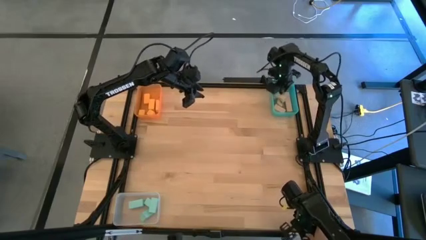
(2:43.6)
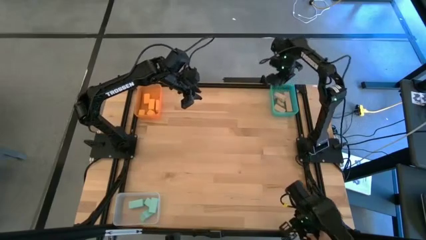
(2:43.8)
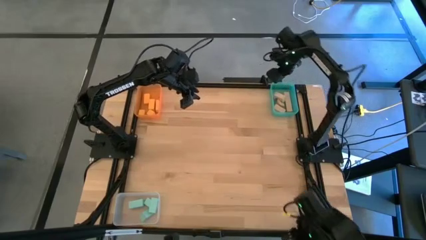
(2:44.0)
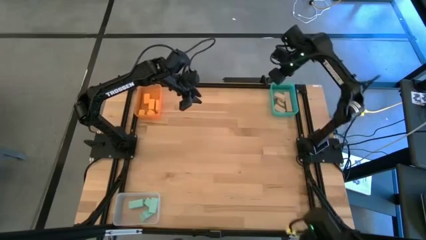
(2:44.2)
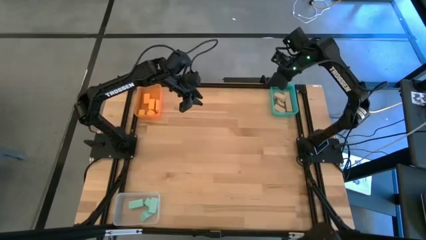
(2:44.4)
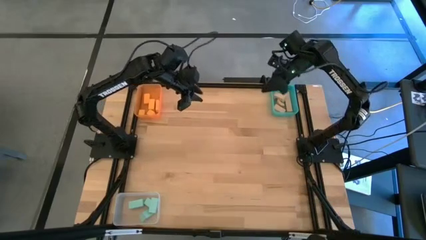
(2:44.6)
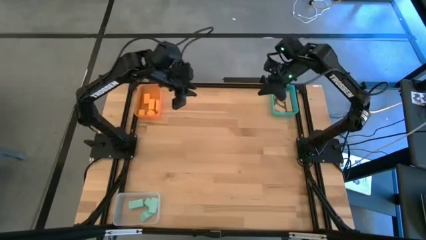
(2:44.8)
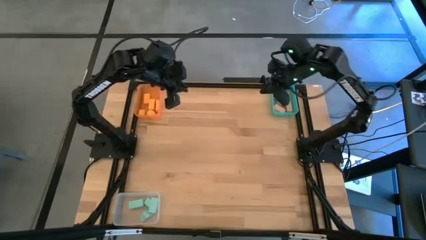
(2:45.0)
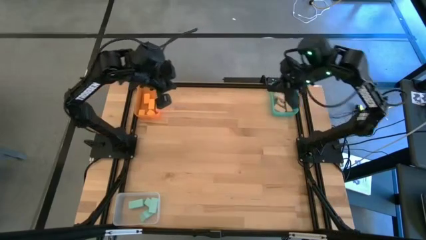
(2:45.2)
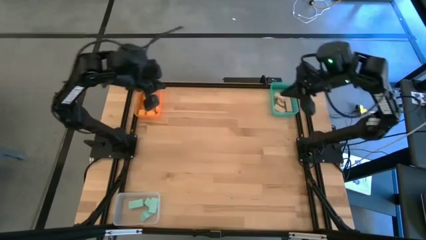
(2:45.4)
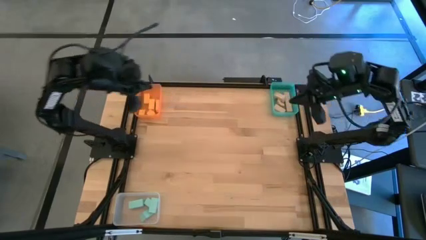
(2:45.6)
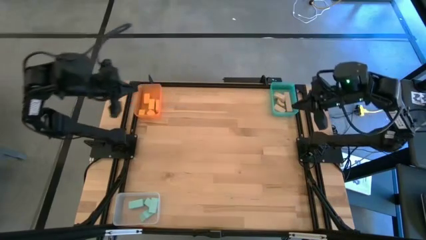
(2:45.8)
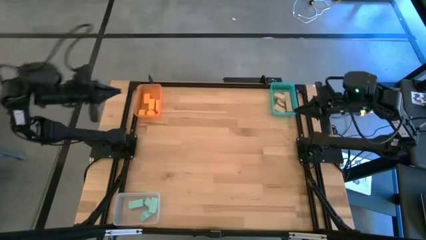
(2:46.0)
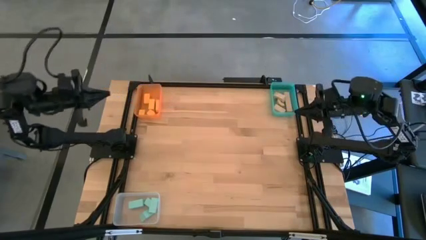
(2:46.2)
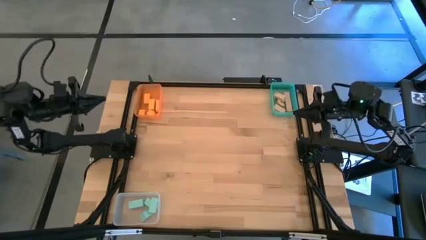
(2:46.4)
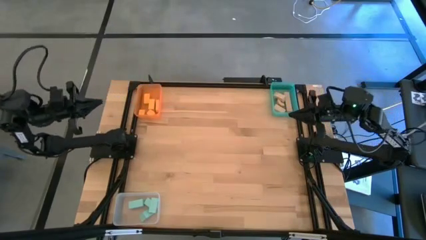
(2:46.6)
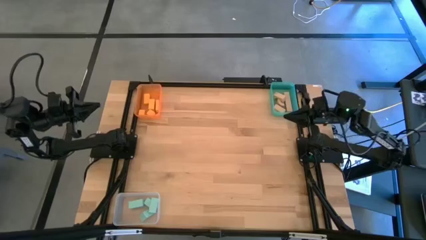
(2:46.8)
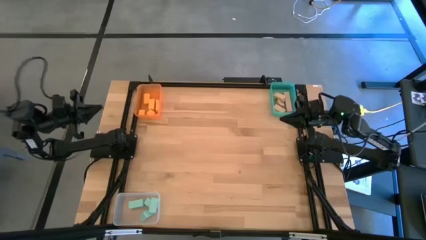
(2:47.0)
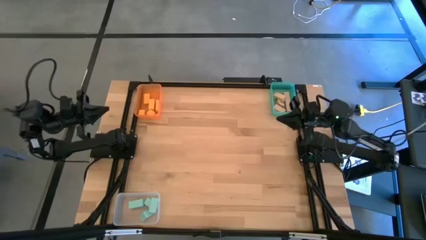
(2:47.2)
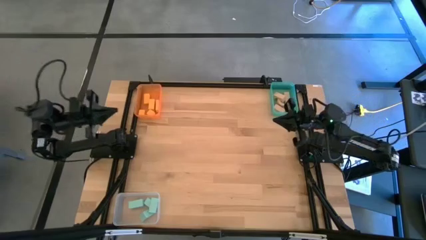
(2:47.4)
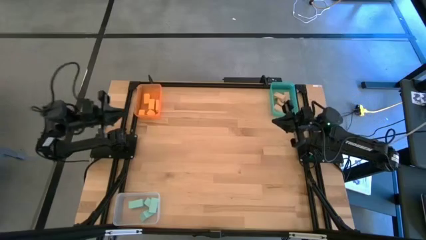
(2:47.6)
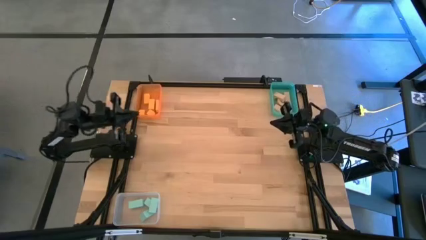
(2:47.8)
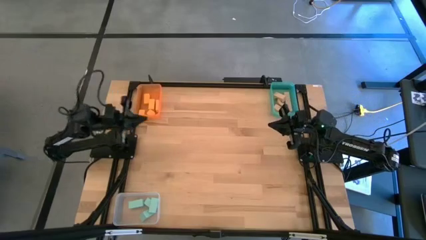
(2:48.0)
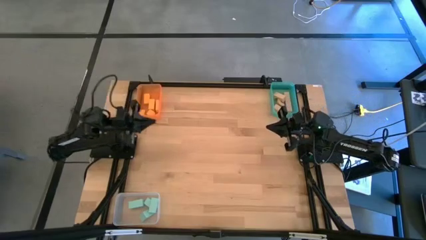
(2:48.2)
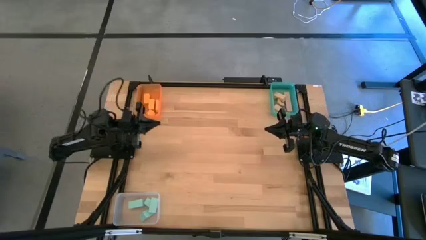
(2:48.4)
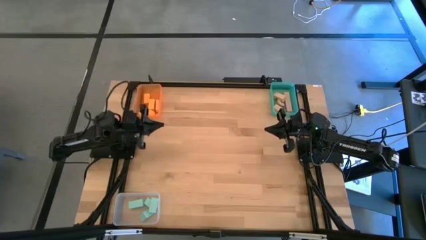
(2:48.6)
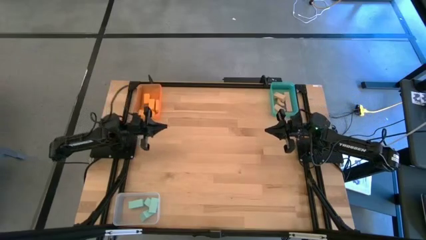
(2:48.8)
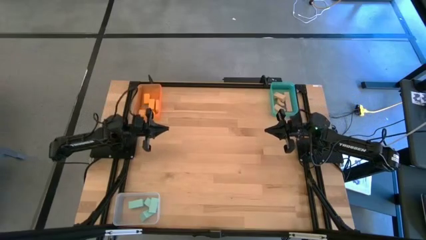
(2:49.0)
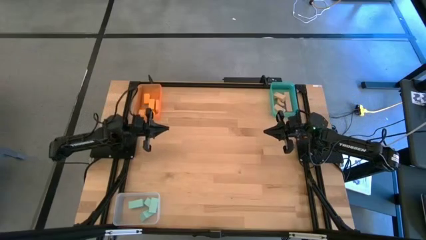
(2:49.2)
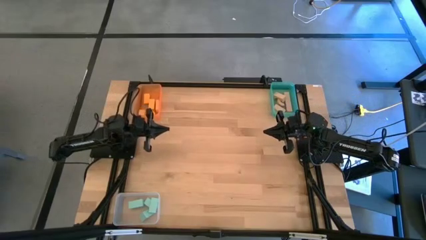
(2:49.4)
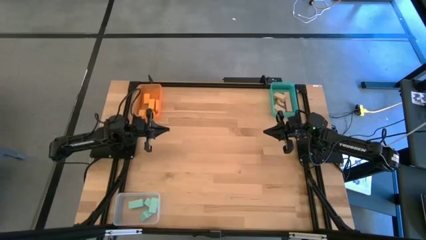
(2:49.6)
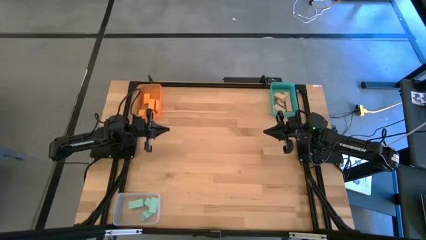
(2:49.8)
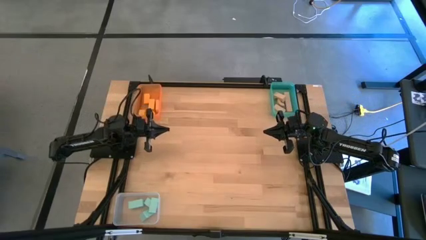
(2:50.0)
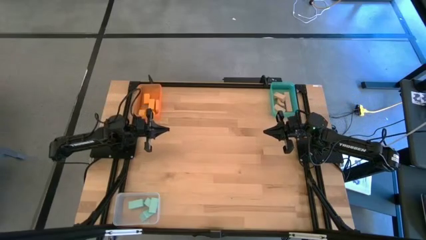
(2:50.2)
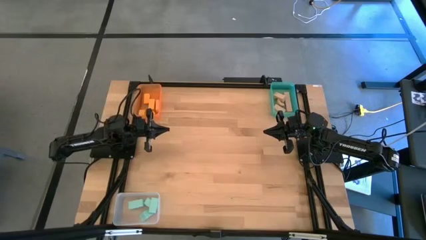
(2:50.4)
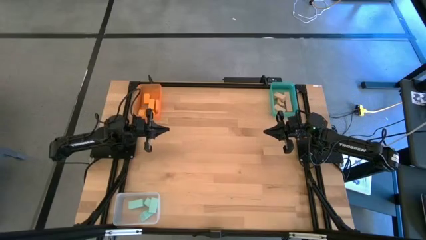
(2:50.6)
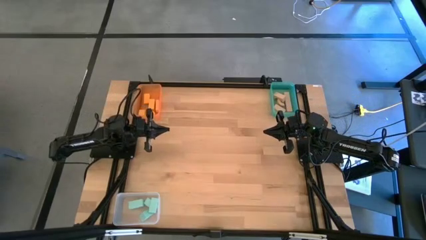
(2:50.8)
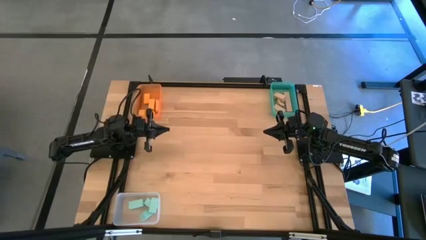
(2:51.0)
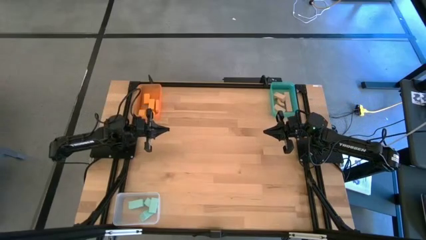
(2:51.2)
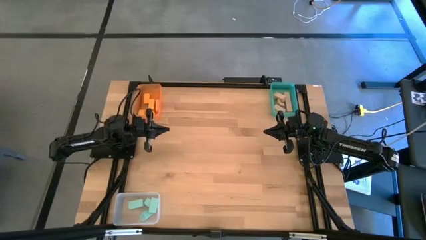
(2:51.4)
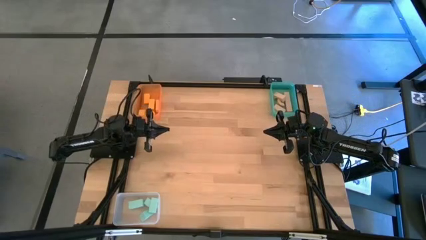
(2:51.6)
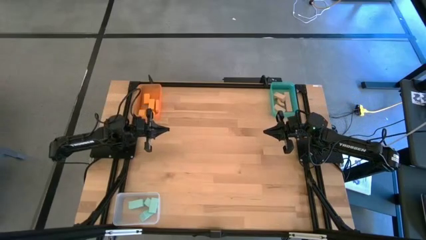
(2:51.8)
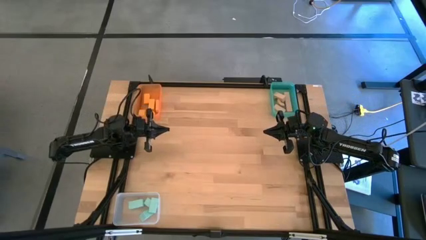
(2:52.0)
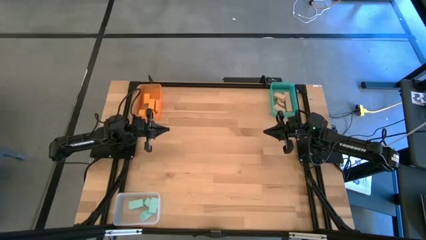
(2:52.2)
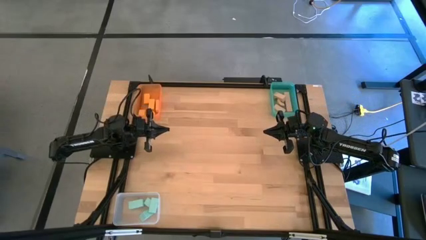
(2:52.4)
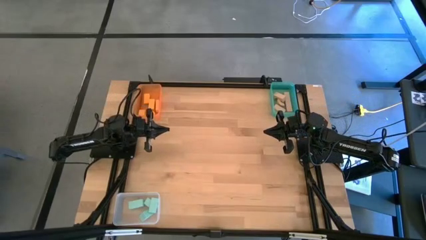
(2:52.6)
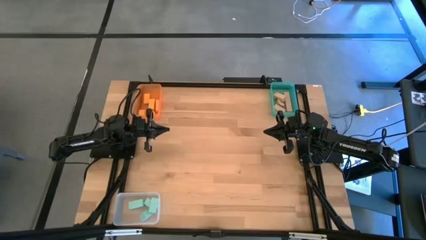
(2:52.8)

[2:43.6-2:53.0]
Task: Sort & place blocks by color
Return to Home Position

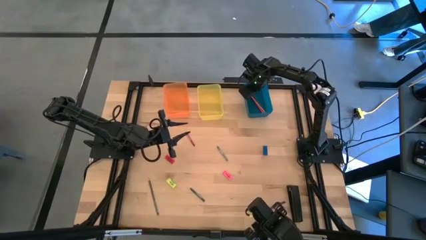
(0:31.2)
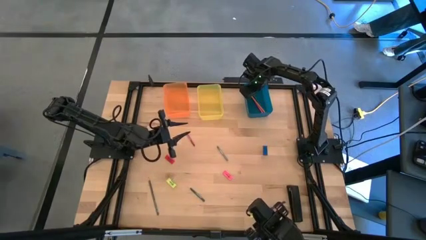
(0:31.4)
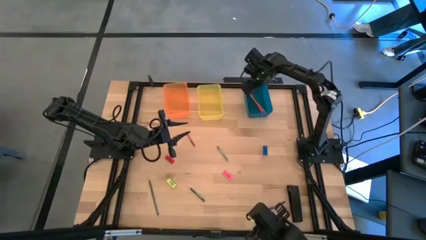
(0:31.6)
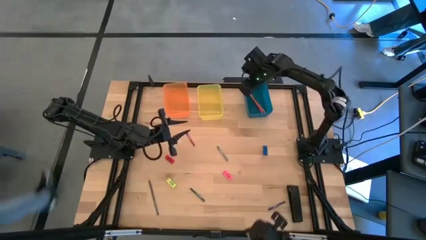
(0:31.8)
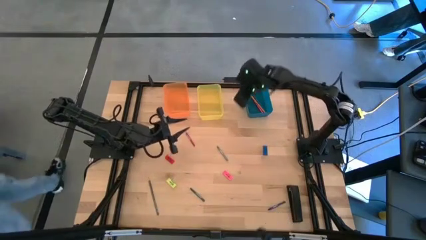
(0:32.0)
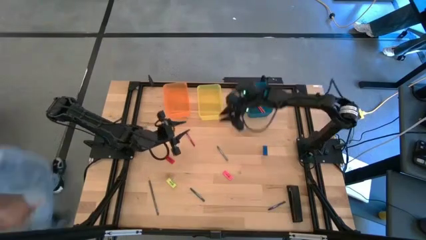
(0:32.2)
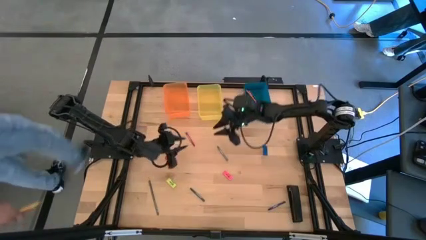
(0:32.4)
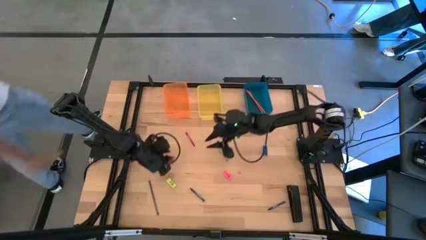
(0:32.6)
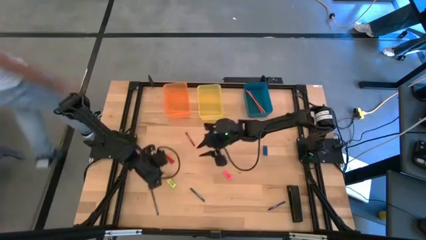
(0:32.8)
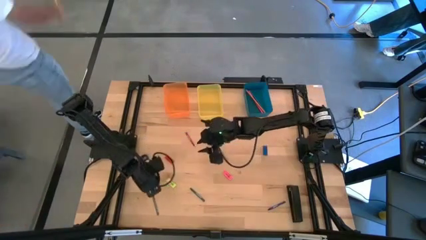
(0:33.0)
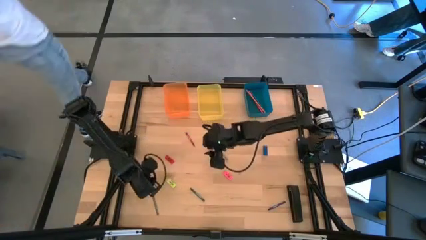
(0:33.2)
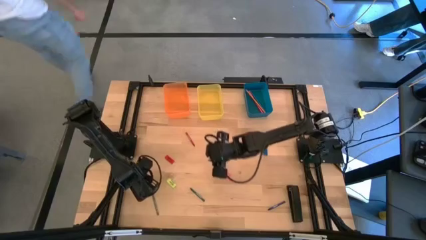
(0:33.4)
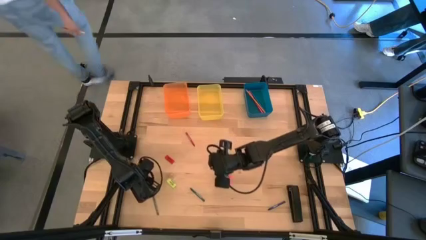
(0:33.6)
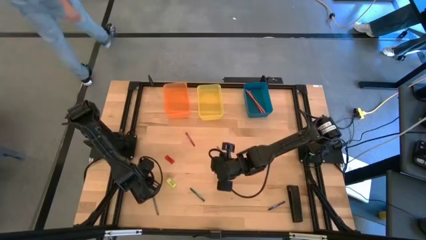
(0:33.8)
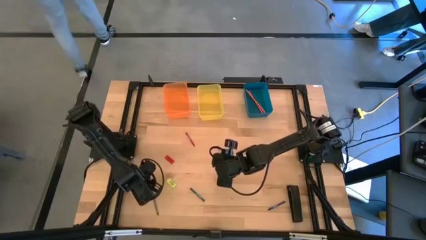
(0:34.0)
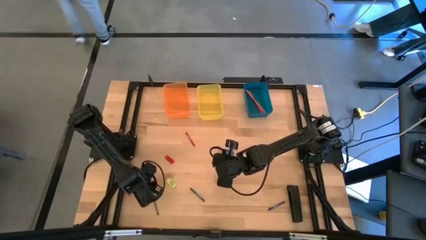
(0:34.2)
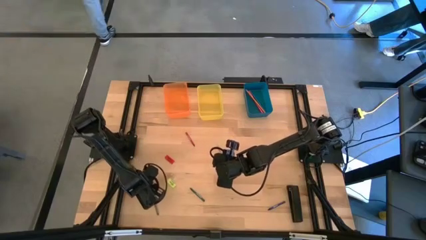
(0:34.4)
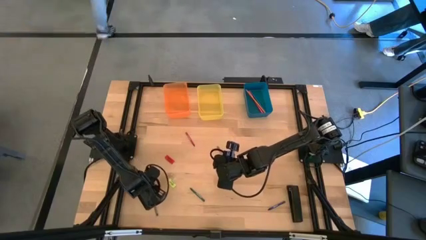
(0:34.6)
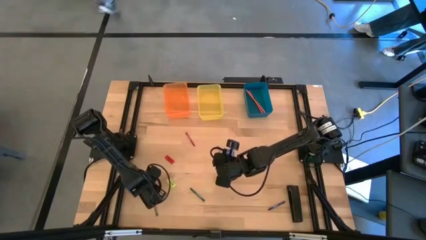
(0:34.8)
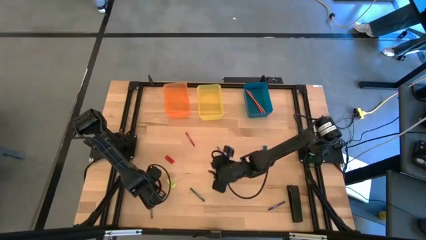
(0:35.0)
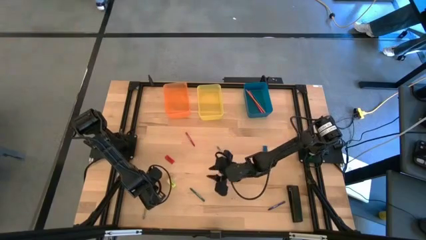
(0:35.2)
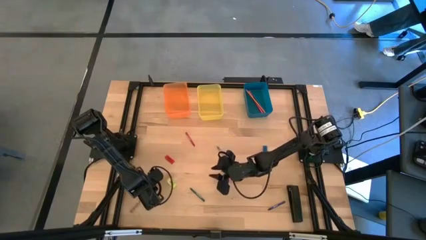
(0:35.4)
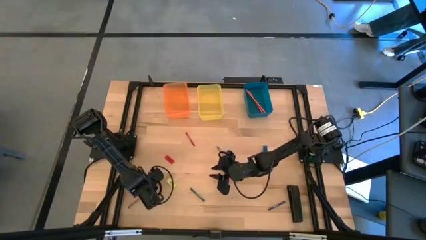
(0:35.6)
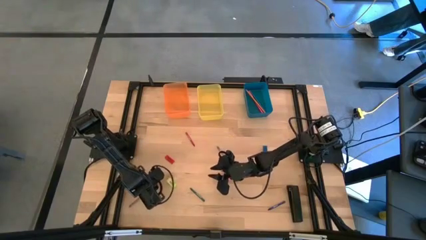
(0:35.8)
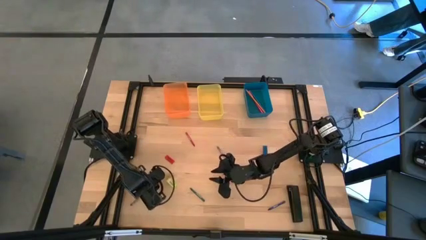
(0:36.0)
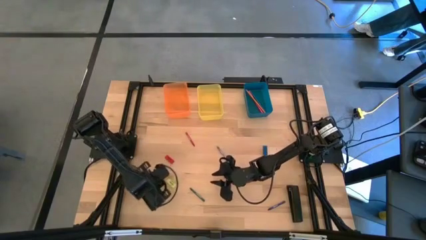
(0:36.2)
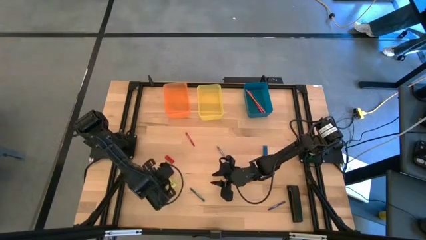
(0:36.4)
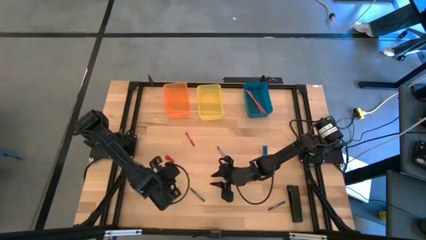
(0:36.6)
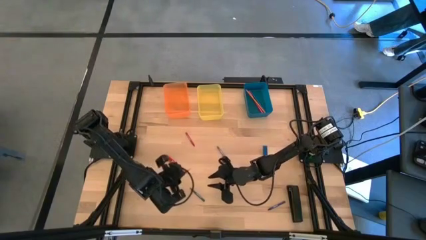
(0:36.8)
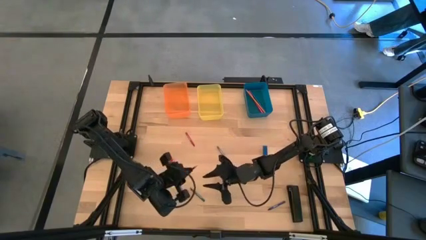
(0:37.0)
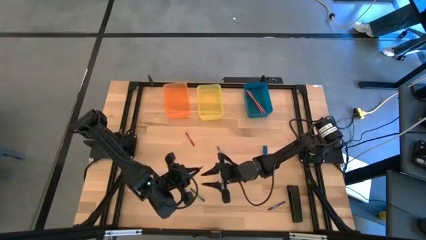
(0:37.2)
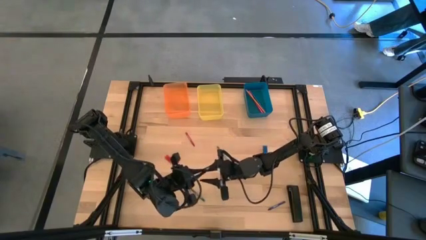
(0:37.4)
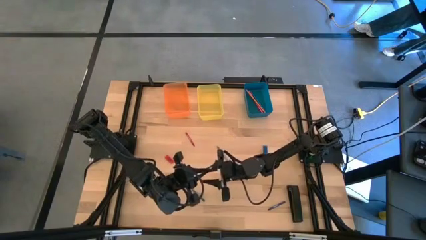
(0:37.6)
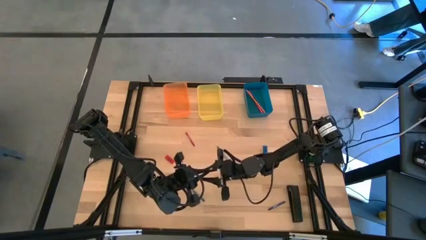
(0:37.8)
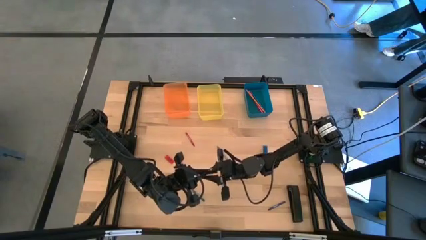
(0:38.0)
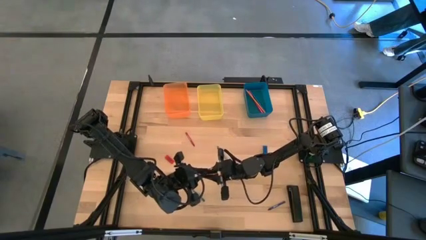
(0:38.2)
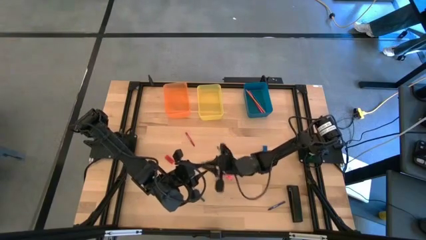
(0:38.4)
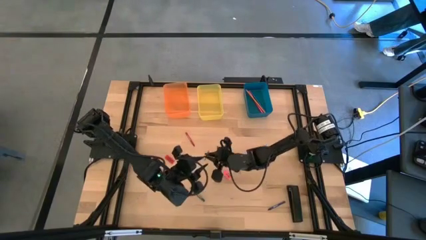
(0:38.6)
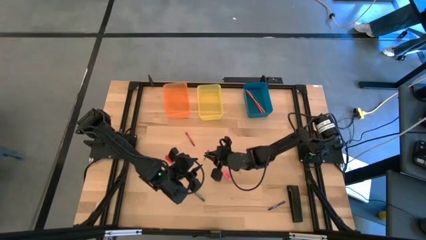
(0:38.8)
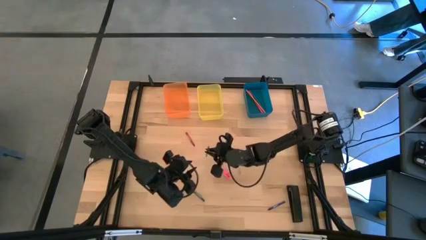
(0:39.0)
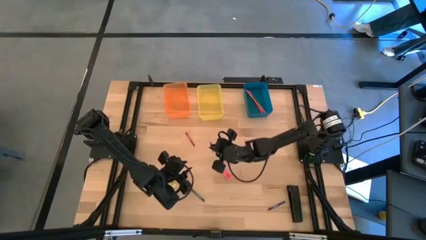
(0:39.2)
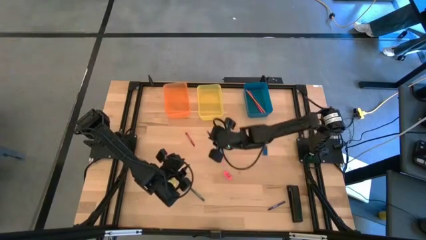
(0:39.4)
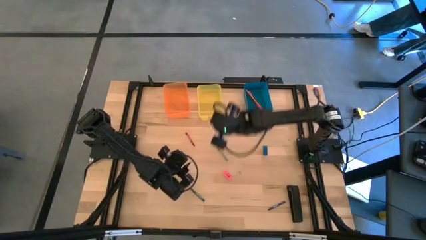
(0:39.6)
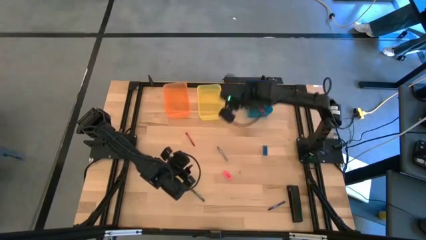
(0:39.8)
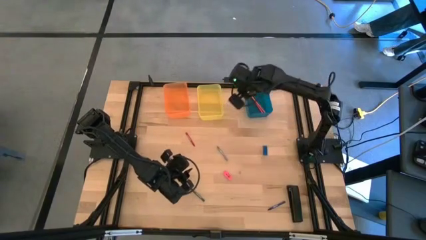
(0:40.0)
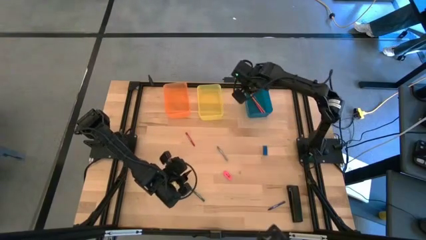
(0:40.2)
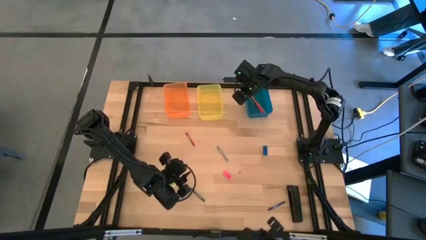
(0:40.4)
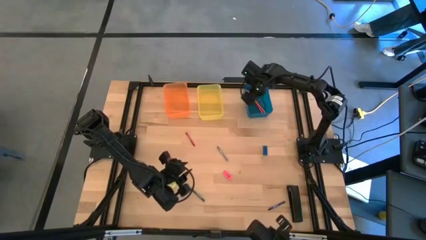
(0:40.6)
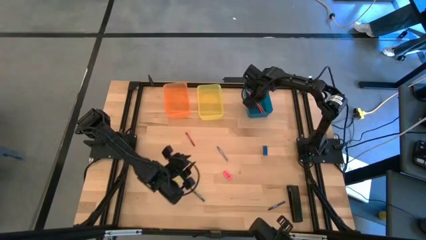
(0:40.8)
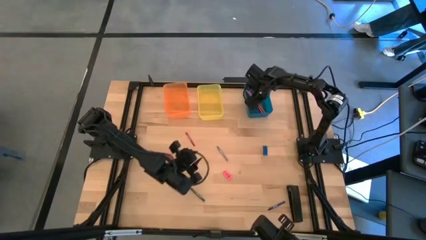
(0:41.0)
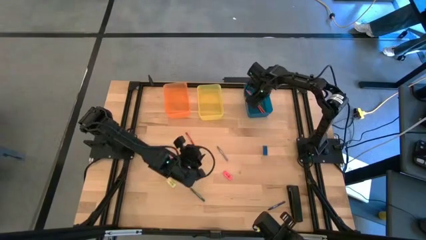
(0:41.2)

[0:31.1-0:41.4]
Task: Sort crayons/erasers/pens/pencils in bins
Put the black pencil into the blue bin
